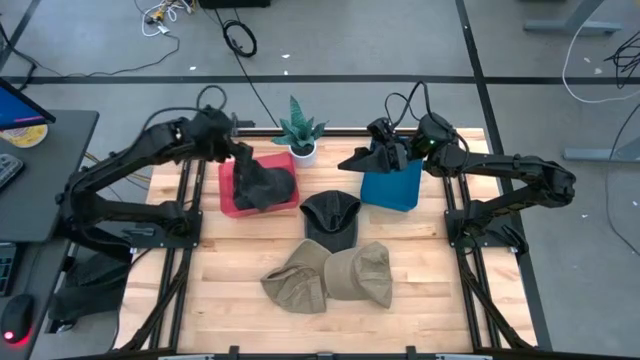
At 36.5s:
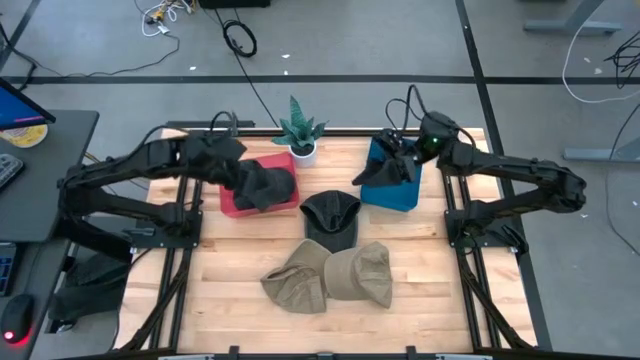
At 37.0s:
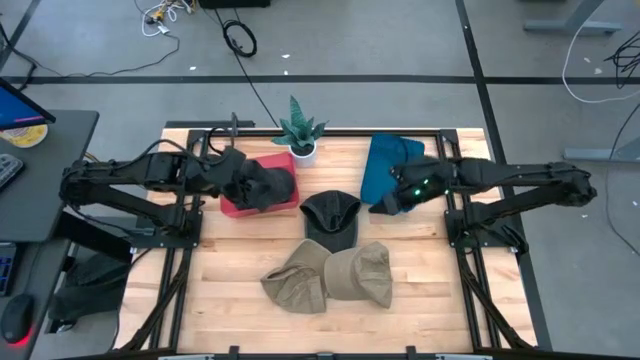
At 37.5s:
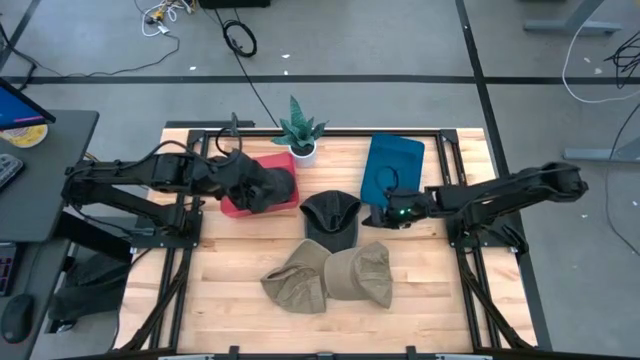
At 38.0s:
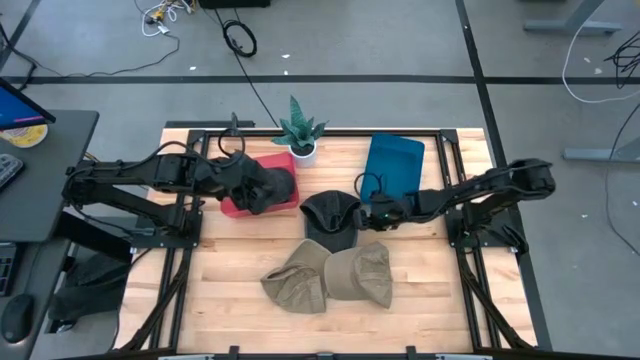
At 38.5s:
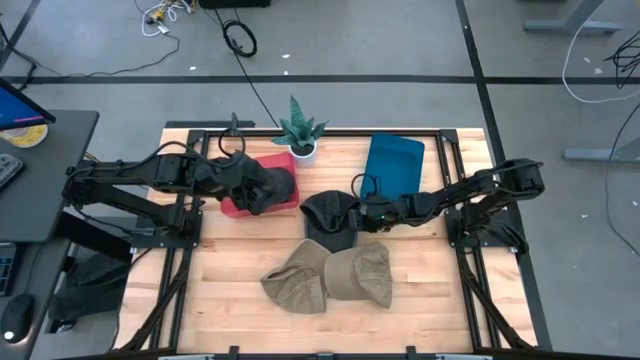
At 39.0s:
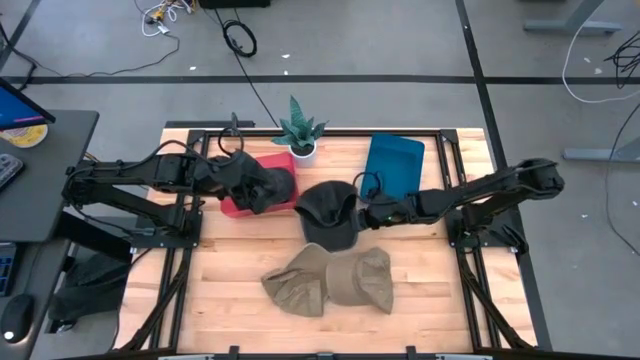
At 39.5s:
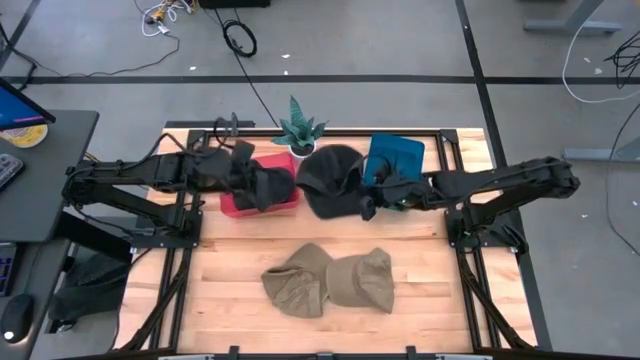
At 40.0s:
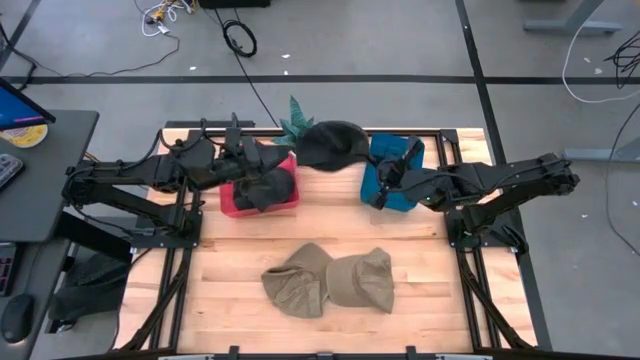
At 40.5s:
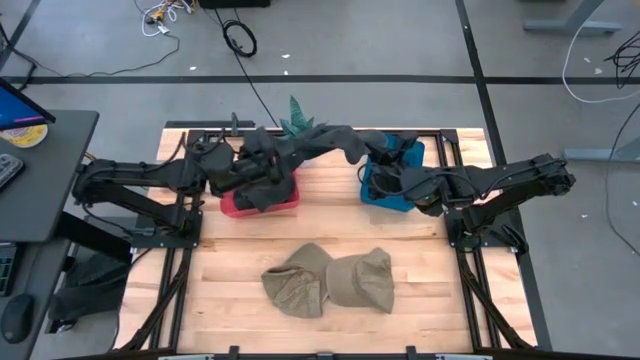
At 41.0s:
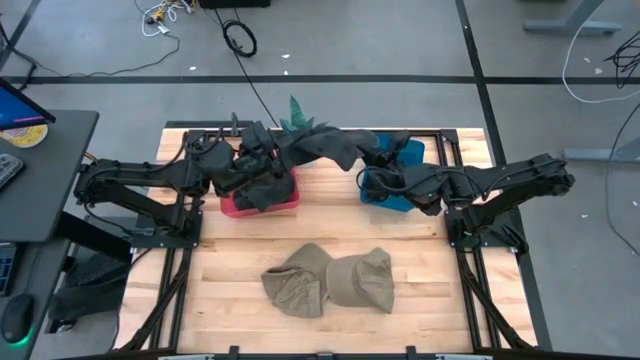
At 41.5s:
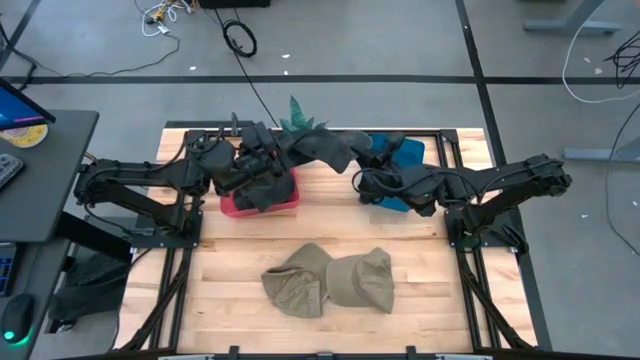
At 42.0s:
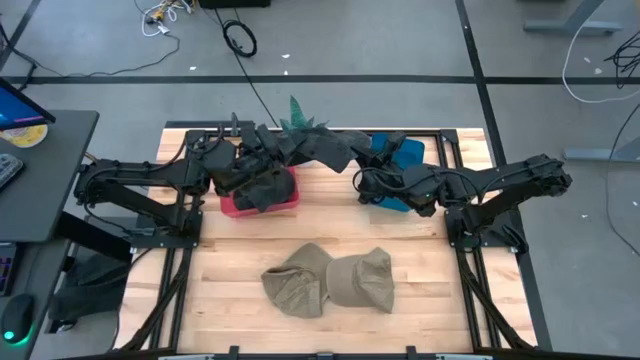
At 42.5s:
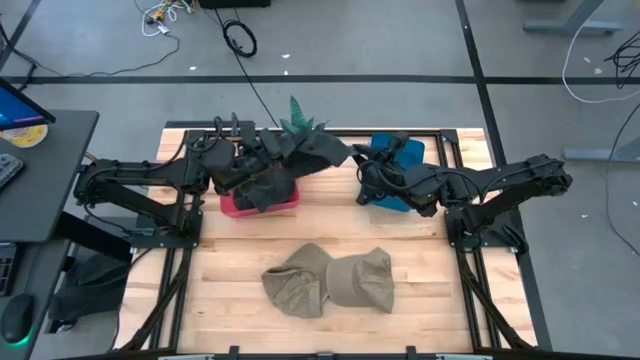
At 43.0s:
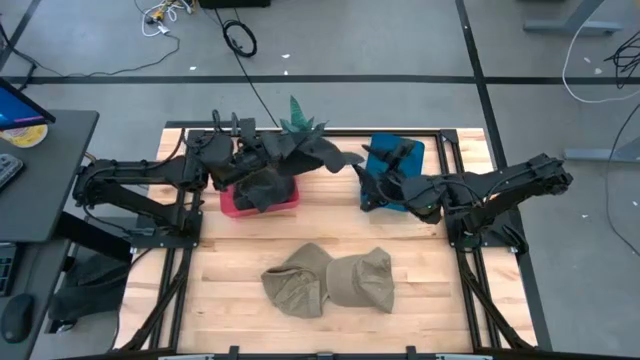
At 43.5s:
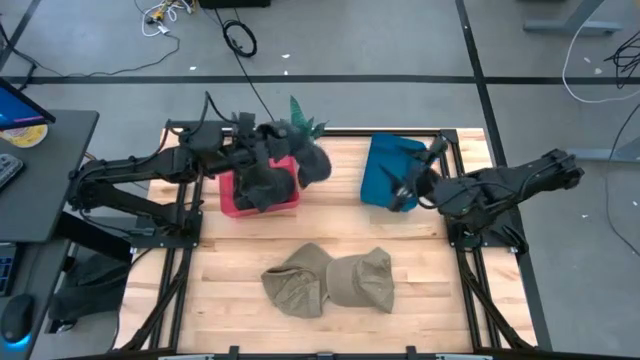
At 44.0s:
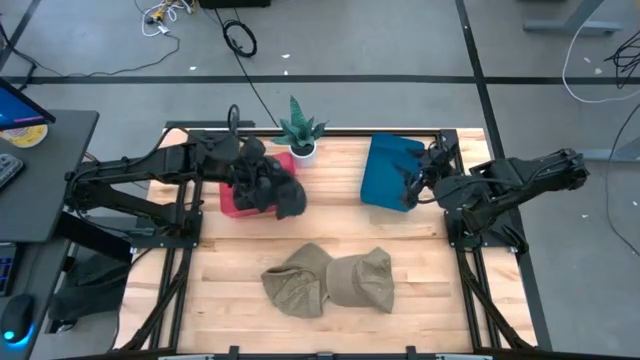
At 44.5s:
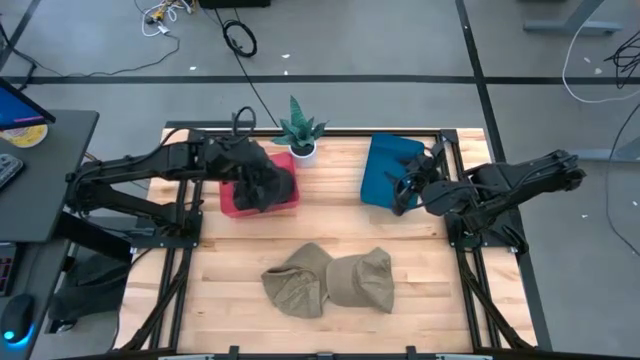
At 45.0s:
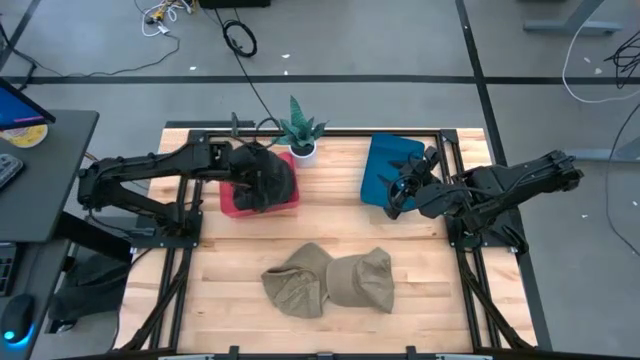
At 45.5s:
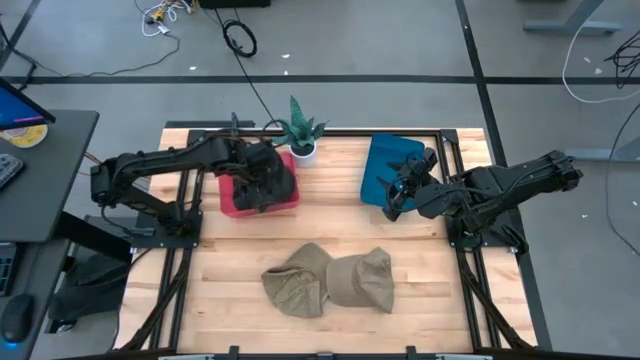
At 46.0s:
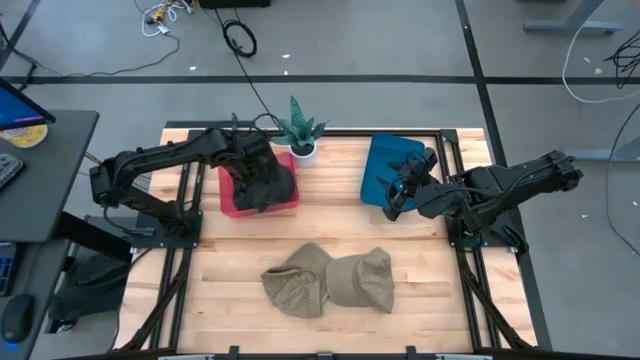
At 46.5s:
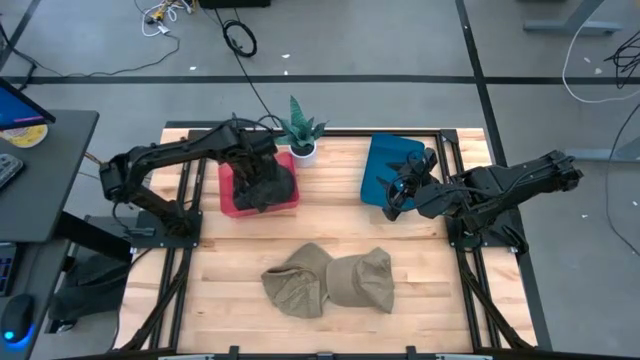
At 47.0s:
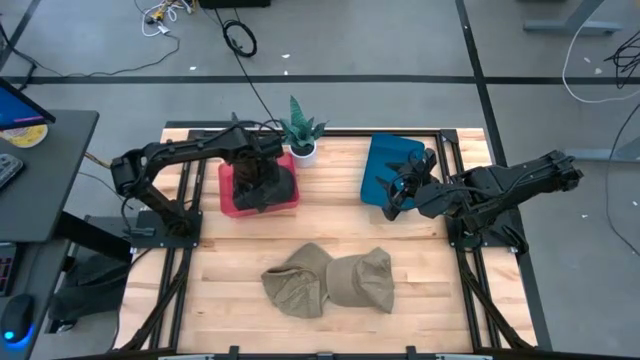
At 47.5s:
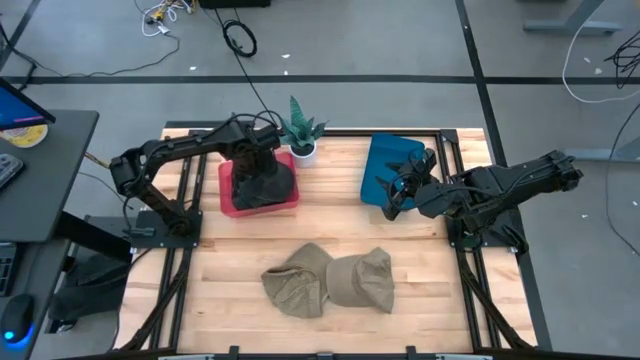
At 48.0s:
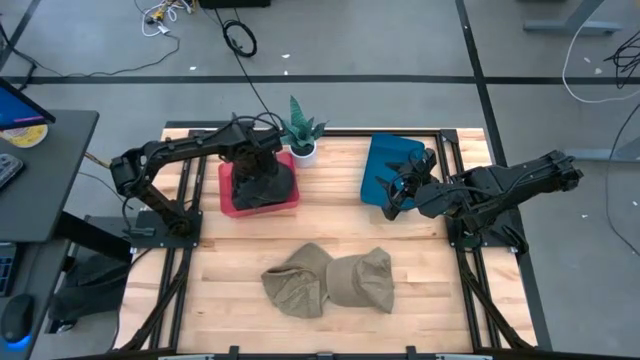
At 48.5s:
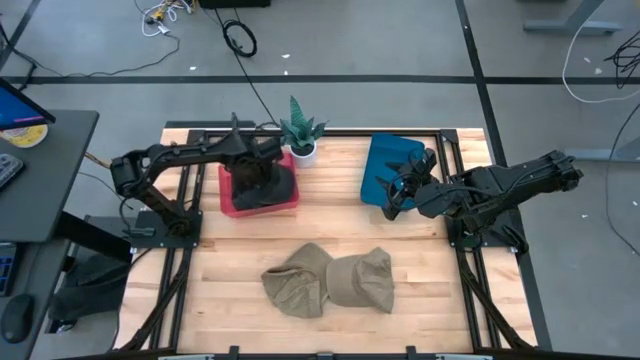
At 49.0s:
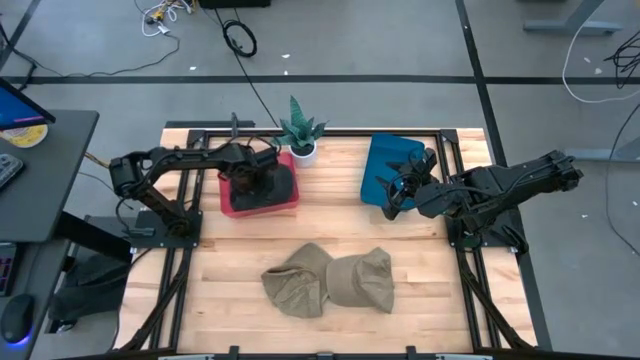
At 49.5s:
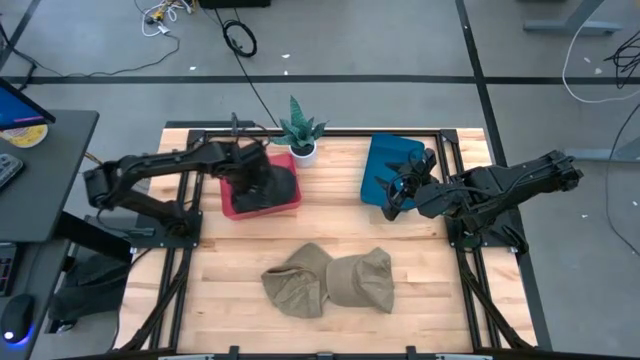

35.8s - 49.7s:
Task: Pick & Place hat
Put the black cap into the red bin

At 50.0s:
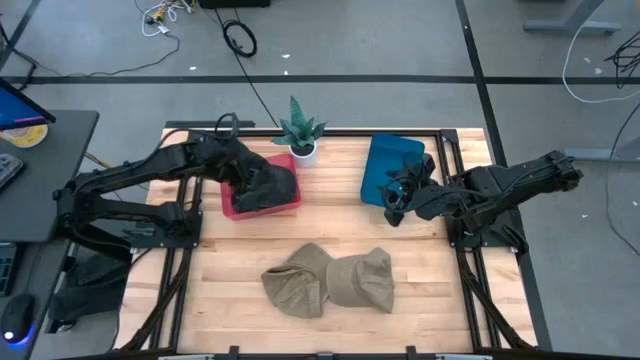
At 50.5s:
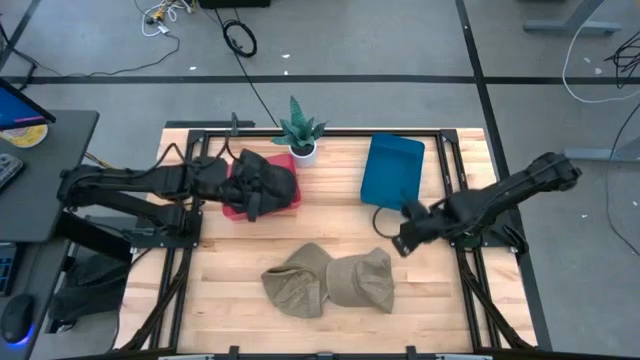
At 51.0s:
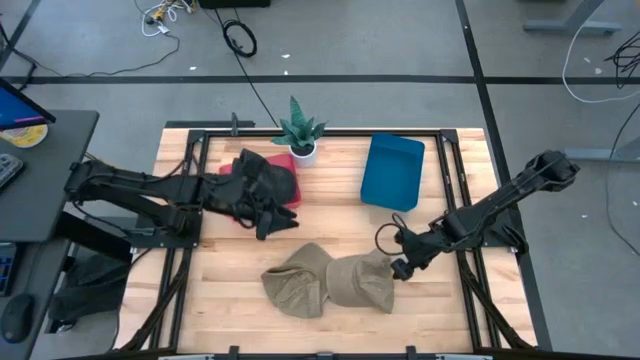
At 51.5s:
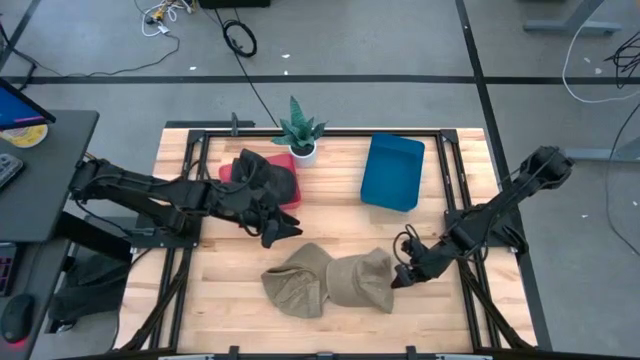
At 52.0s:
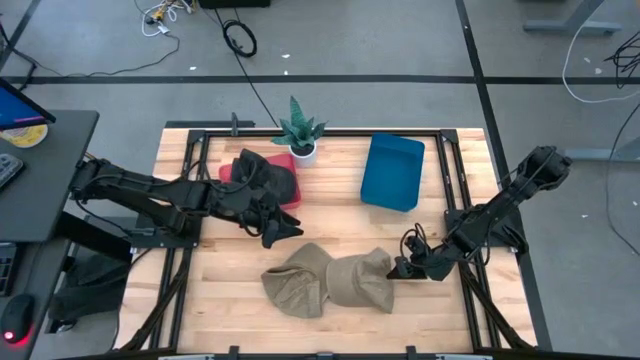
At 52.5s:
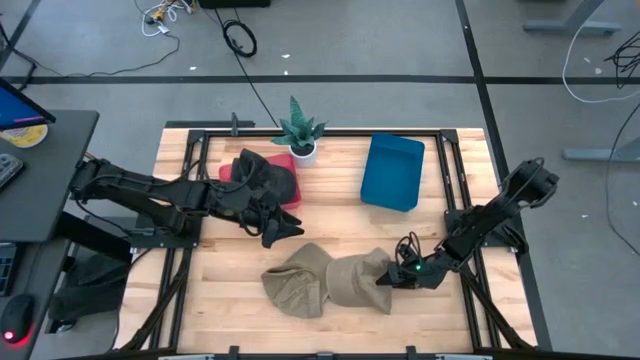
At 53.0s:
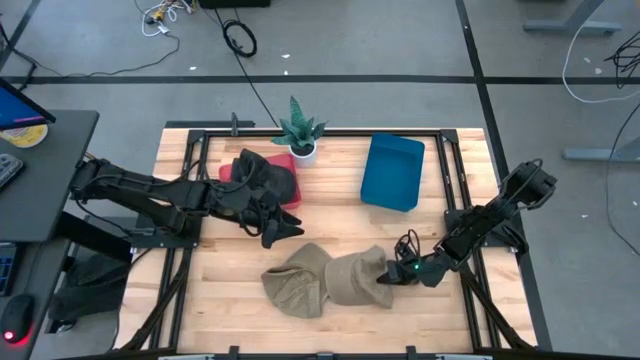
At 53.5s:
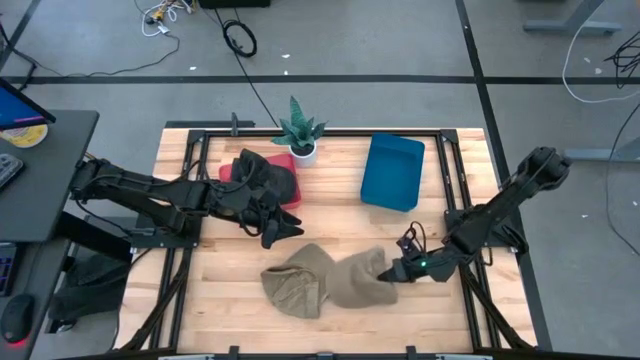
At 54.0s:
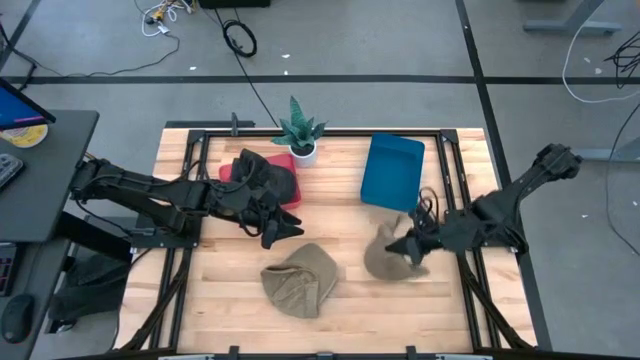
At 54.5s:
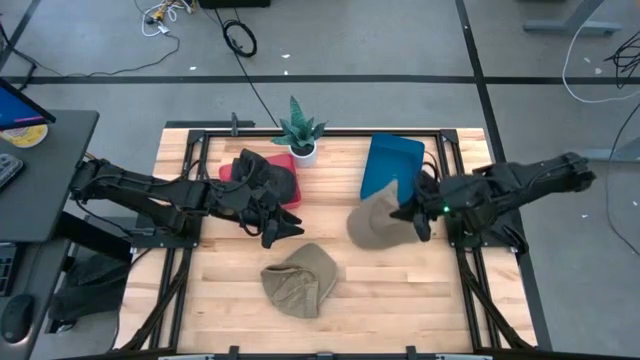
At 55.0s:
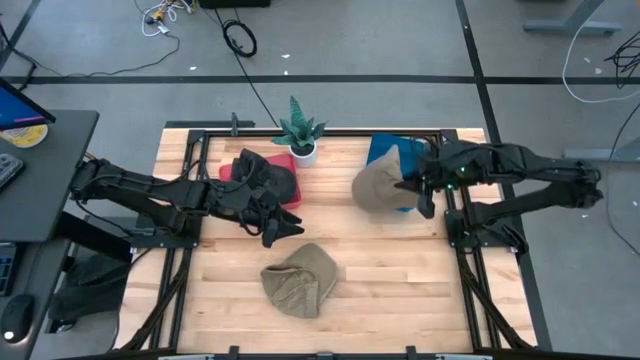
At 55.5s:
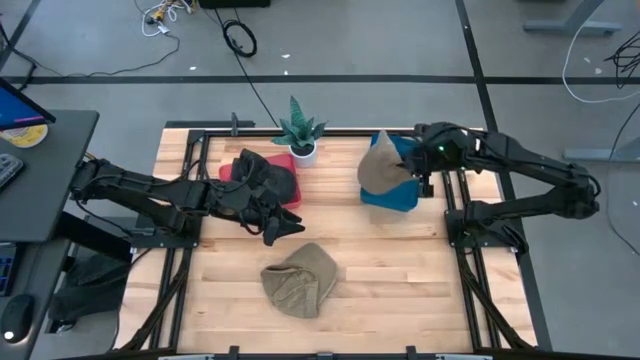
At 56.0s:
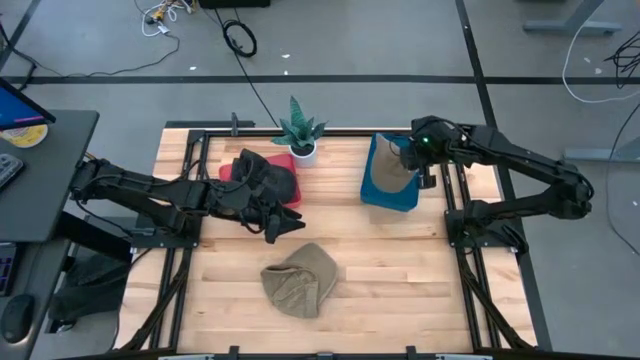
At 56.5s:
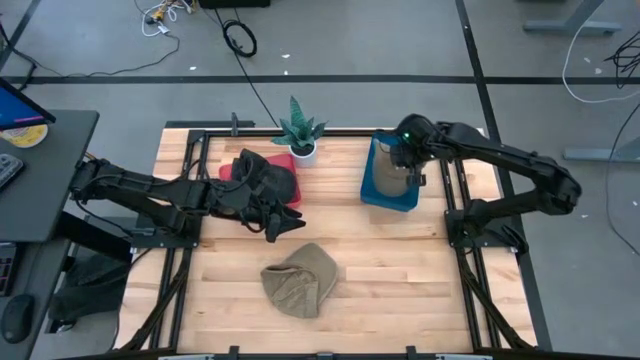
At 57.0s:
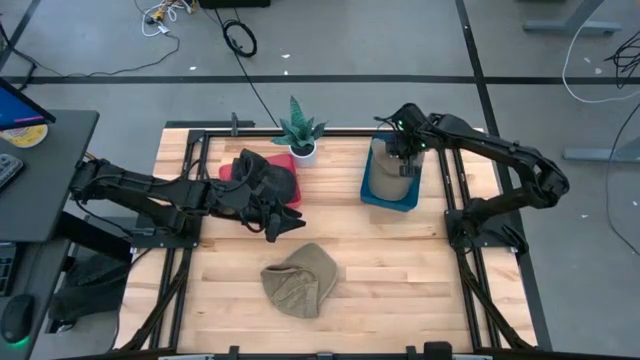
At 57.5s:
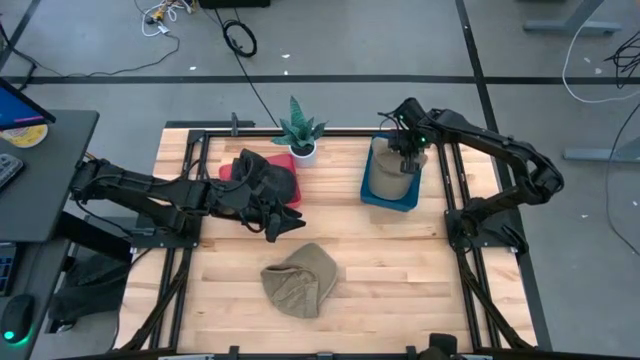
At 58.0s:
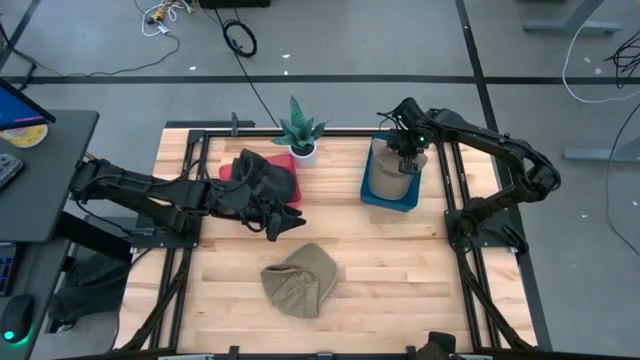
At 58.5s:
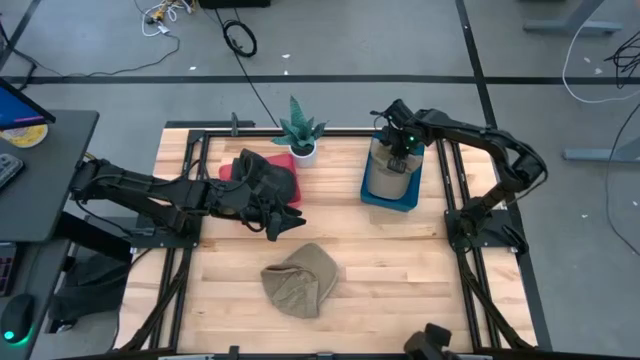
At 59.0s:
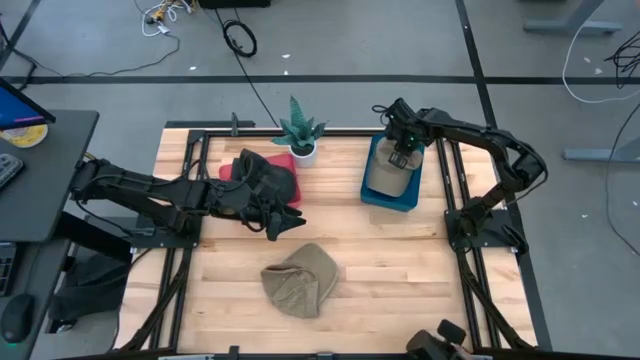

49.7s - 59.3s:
Put the right brown cap into the blue bin
